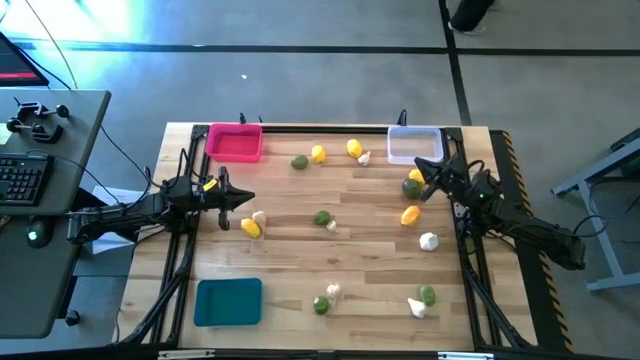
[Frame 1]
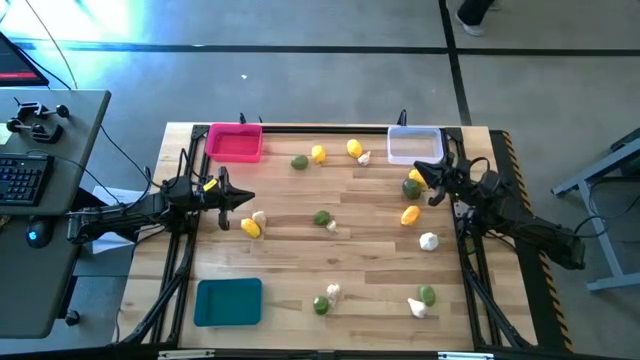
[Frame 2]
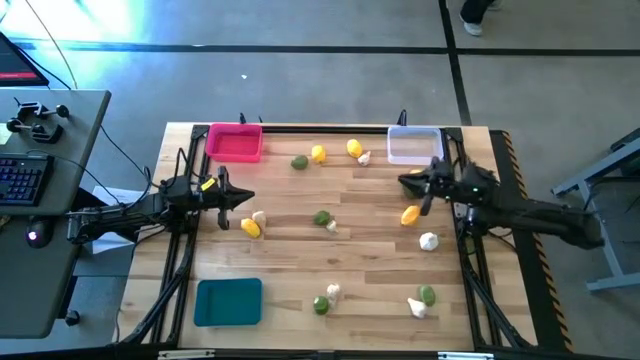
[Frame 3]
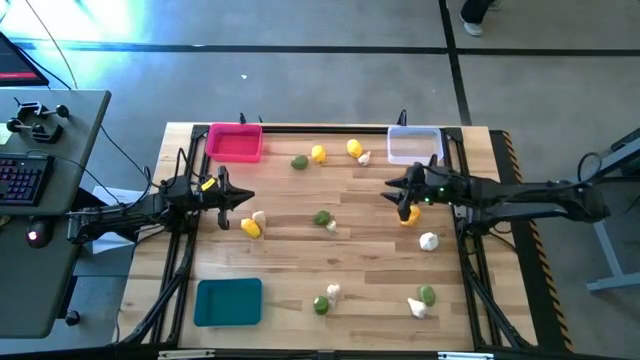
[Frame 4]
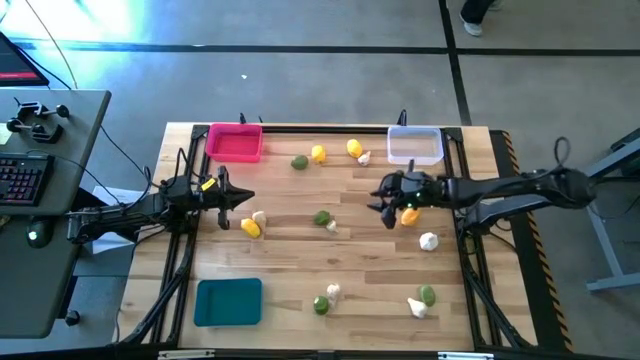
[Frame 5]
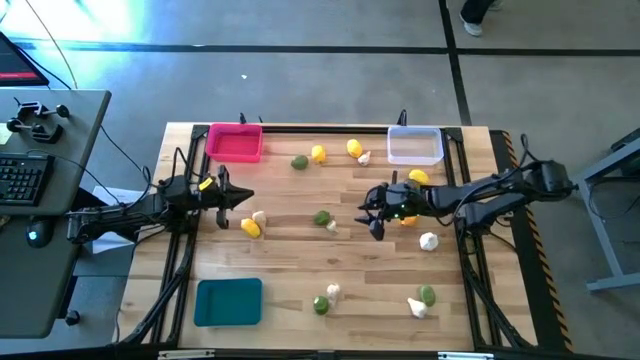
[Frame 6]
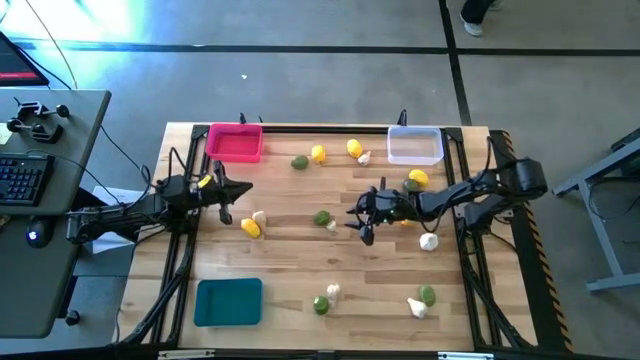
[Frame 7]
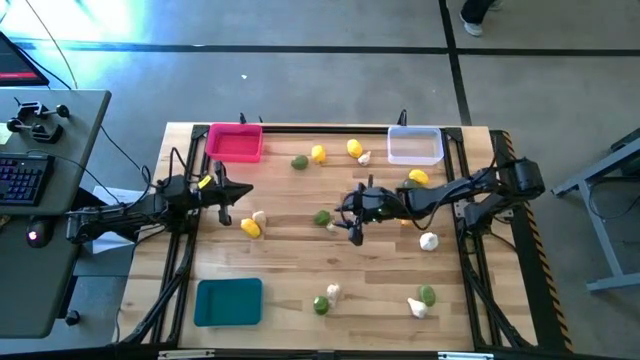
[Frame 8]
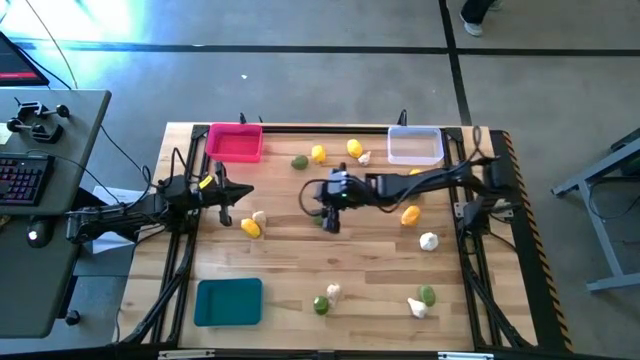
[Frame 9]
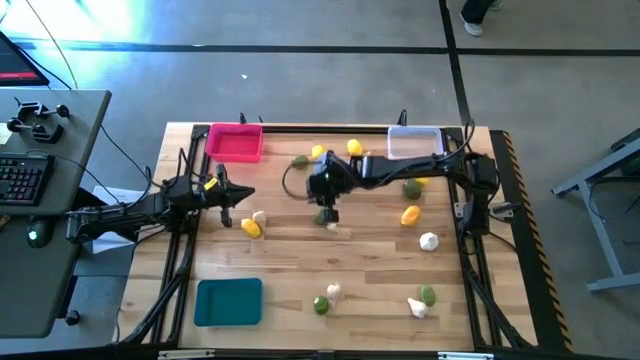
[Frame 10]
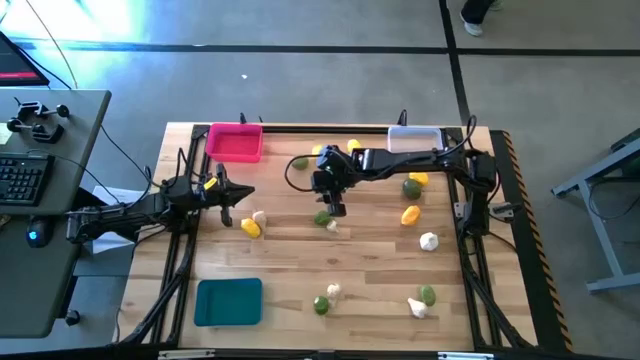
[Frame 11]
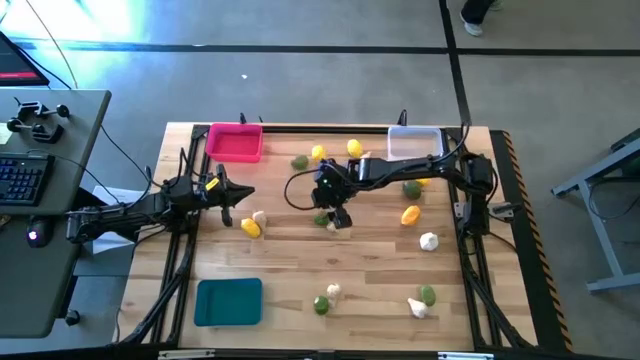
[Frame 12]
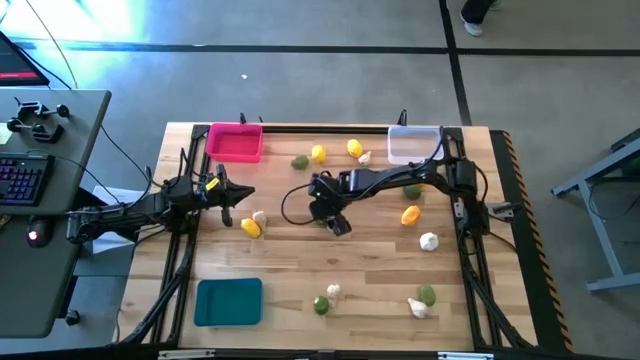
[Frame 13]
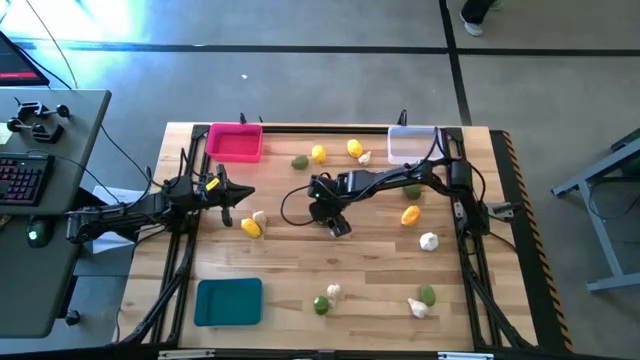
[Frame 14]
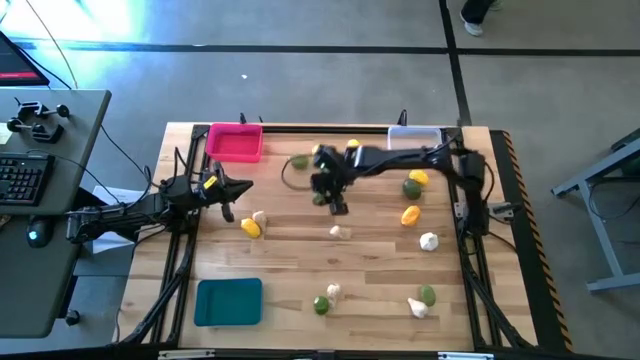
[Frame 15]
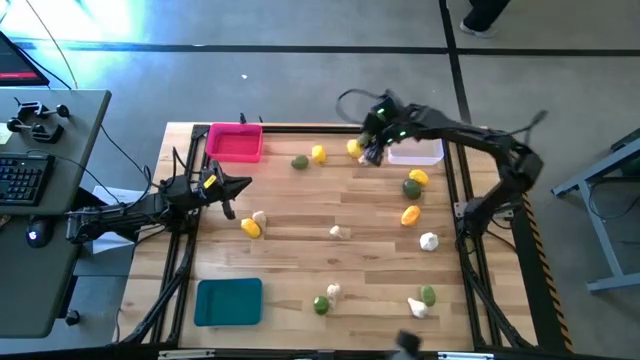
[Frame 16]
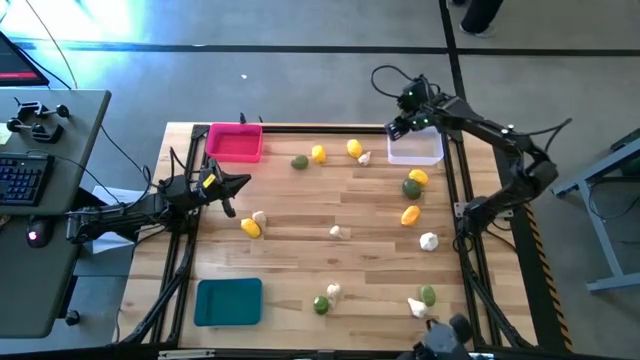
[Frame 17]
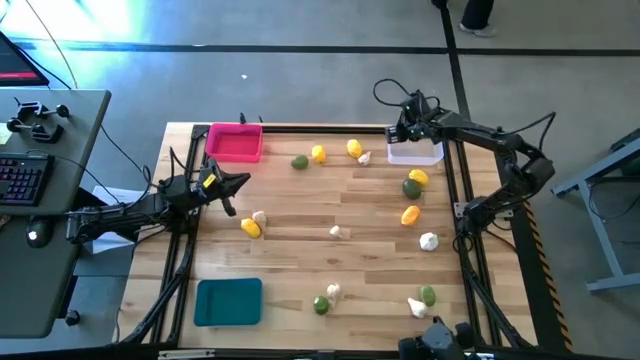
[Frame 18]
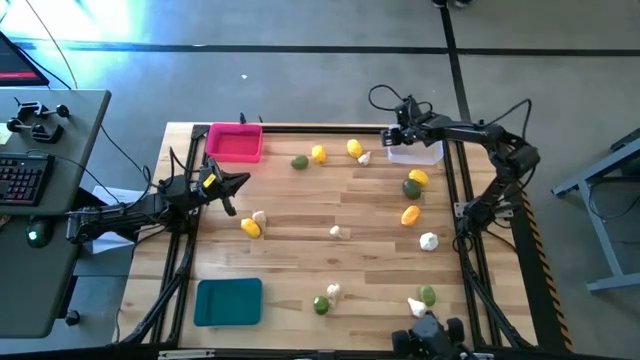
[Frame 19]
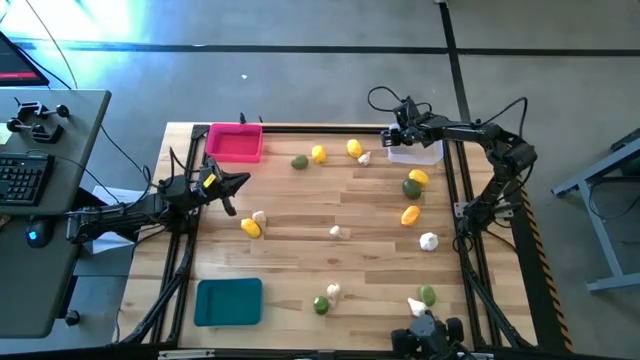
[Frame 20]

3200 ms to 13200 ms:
Task: Sort produce into baskets
Put the center lime into the transparent bin

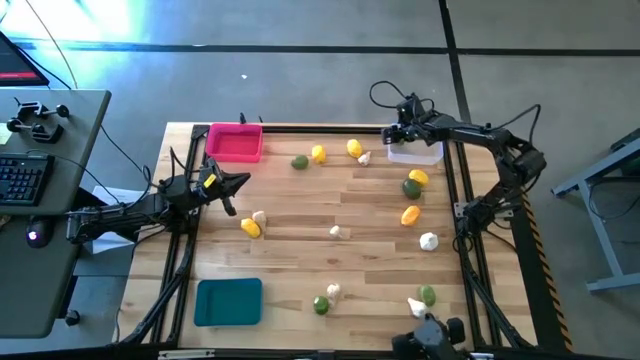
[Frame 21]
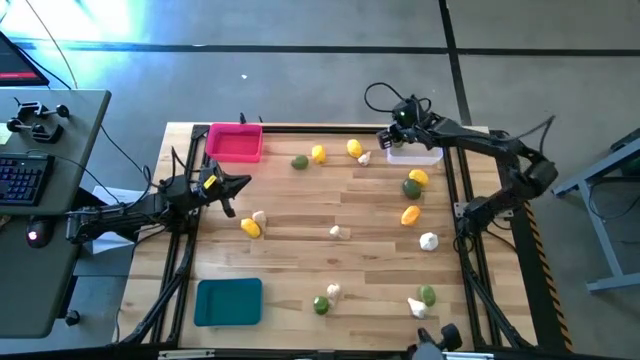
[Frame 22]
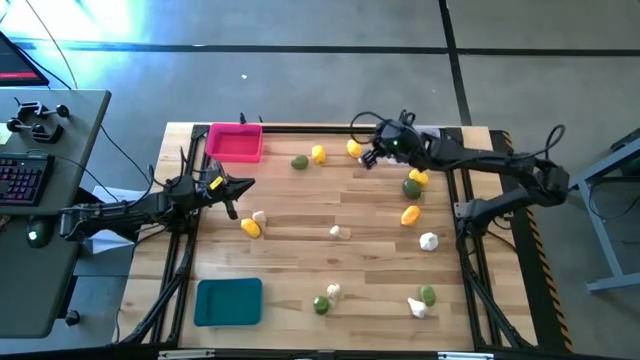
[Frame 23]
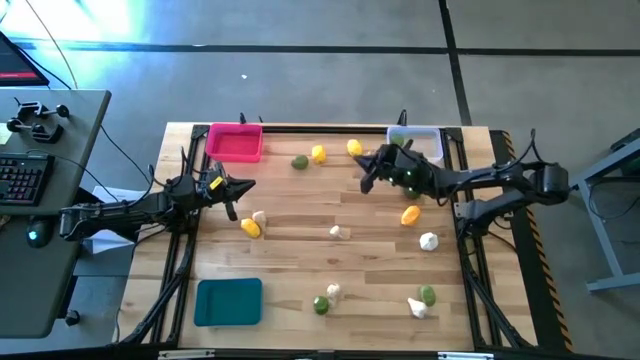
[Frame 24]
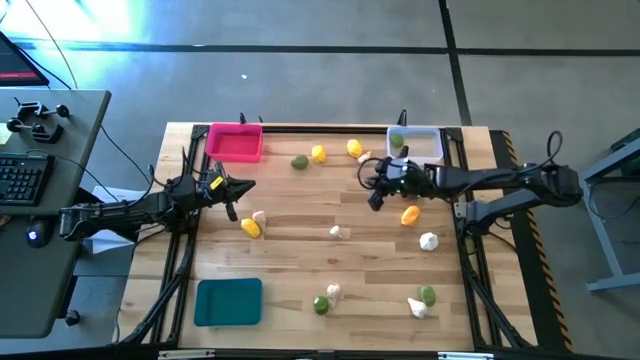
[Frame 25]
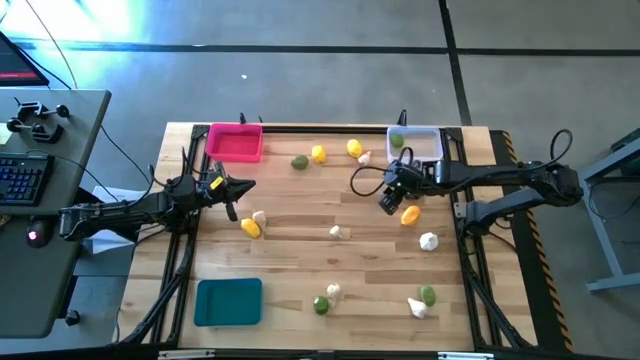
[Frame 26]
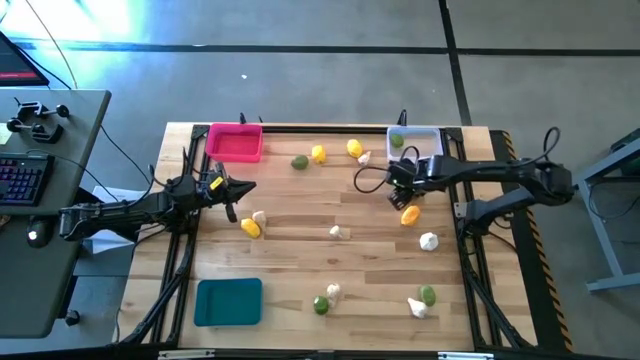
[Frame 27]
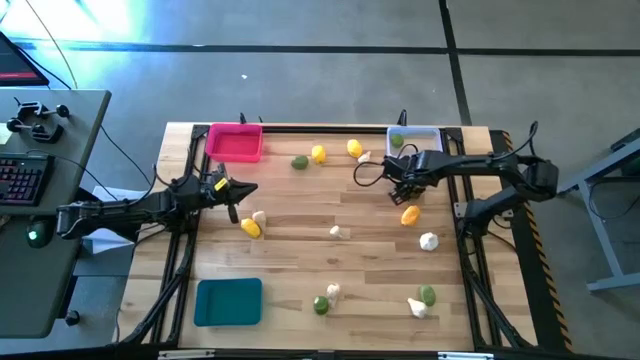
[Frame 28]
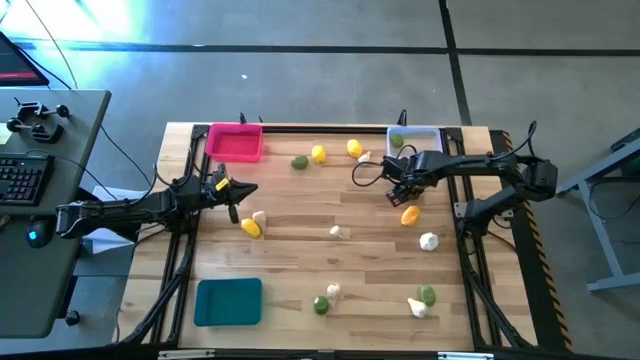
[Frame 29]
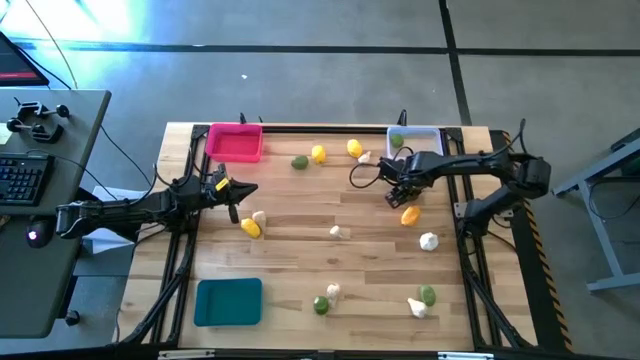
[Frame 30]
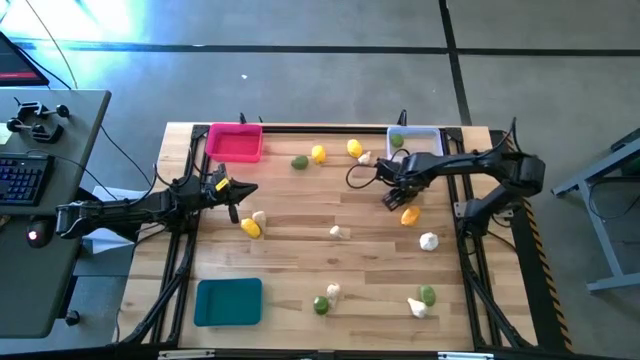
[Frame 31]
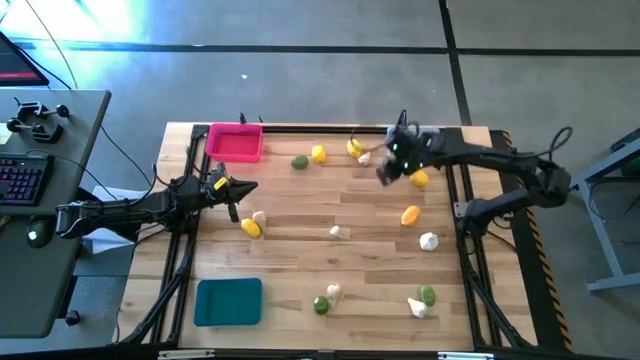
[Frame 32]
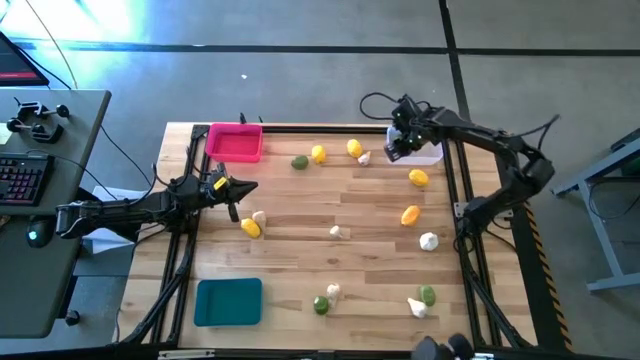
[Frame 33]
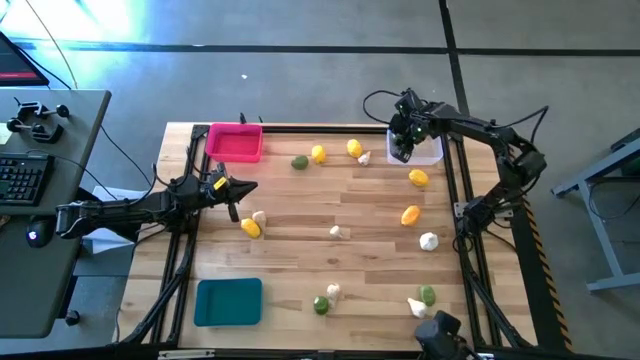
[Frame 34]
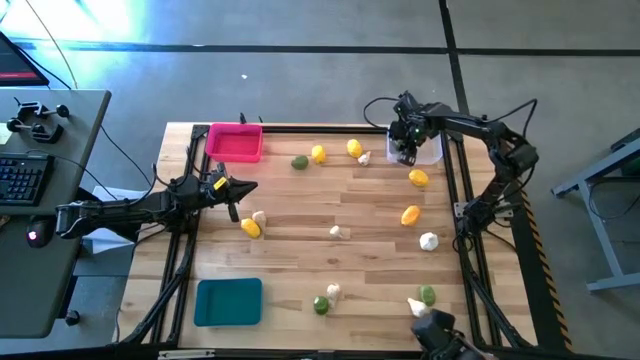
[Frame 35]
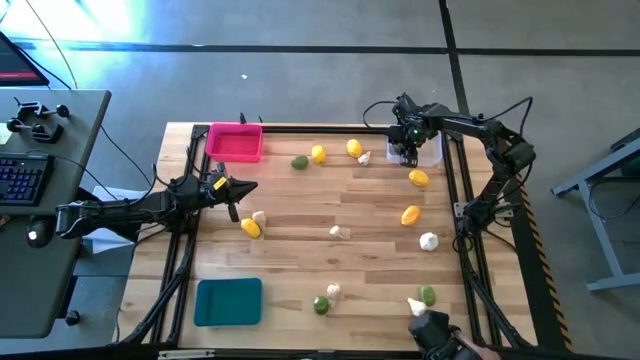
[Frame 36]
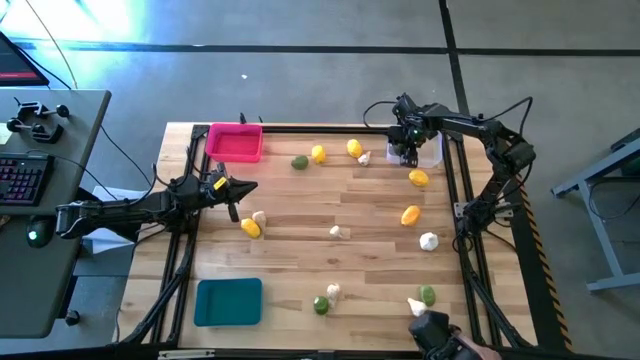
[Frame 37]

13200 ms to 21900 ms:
Put the top right lime into the transparent bin

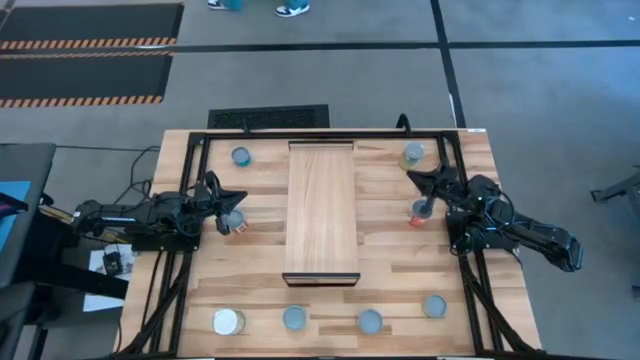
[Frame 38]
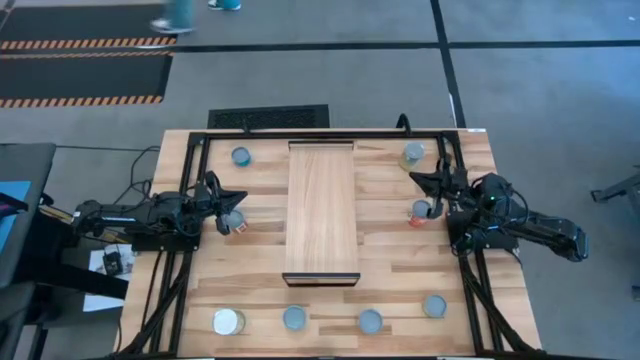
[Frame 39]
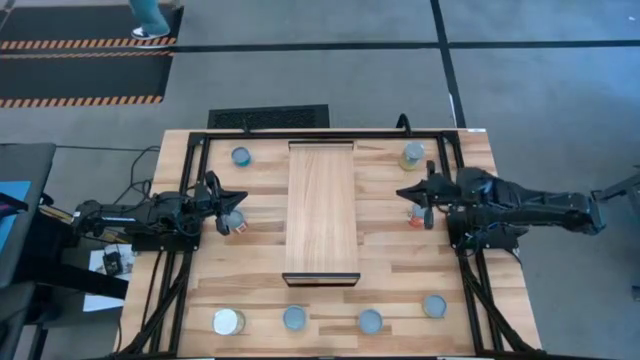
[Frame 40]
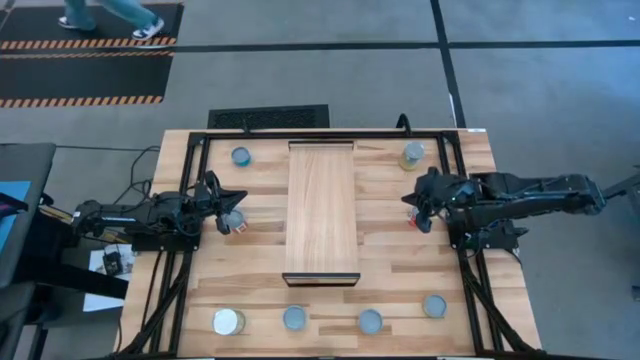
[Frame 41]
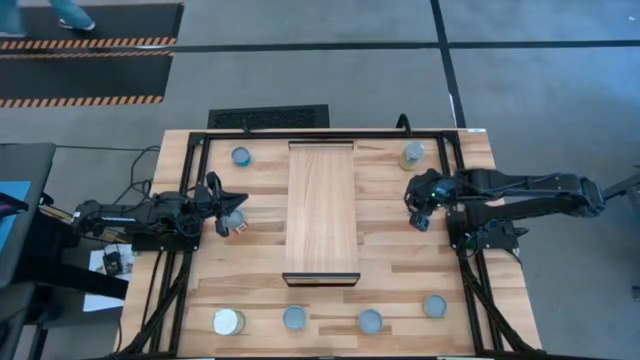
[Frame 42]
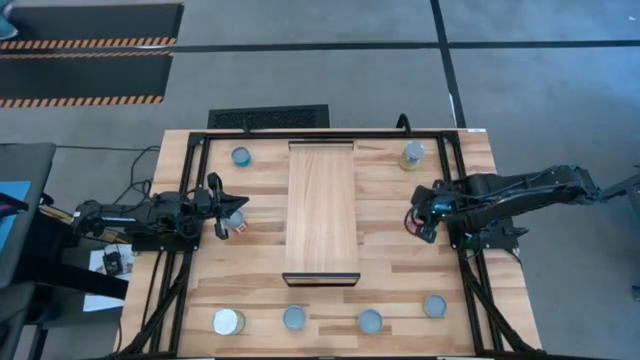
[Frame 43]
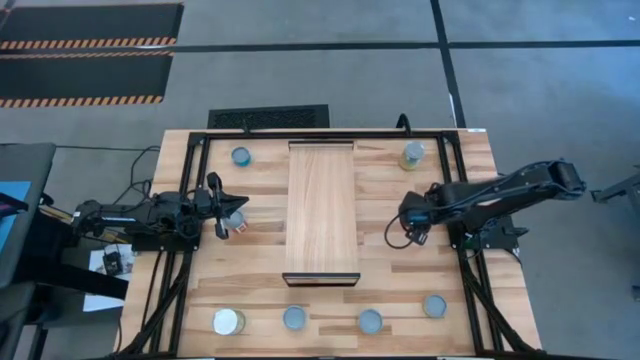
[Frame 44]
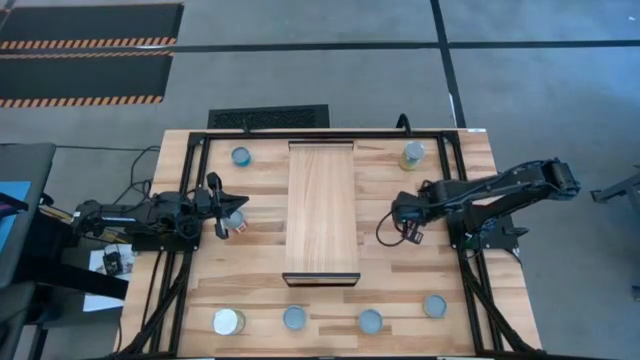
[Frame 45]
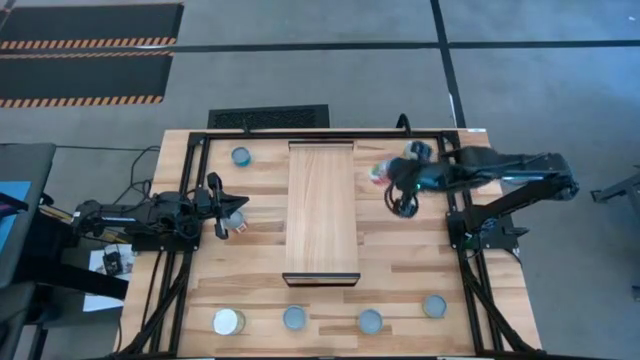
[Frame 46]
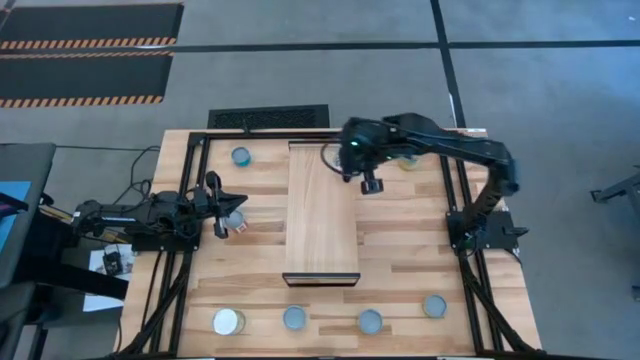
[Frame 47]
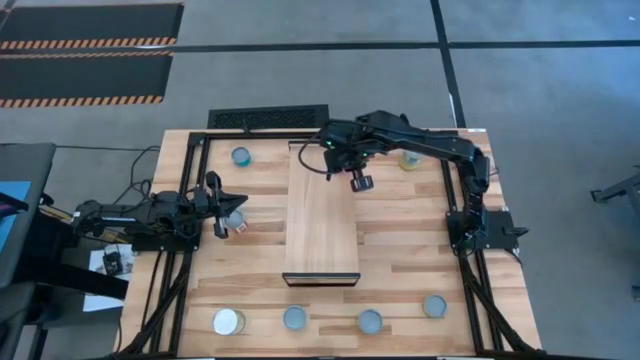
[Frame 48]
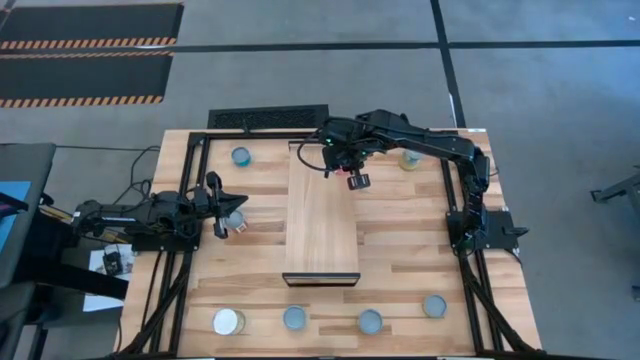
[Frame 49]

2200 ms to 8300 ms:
Task: Pick and place cans onto a shelf
Put the big white can on the shelf
